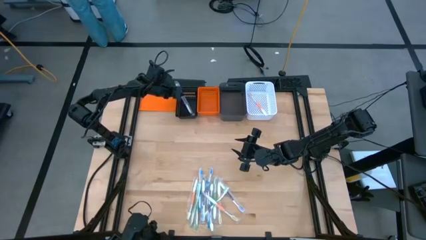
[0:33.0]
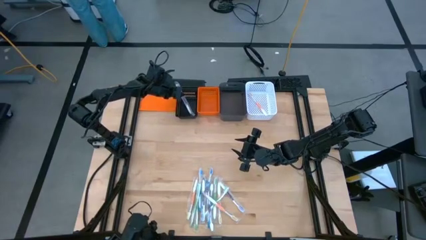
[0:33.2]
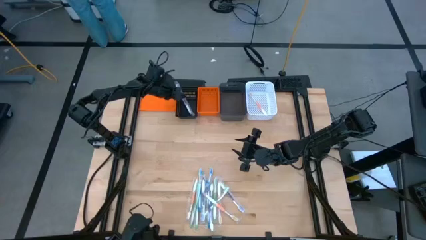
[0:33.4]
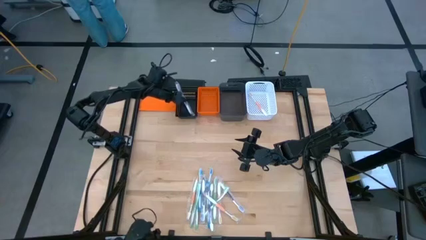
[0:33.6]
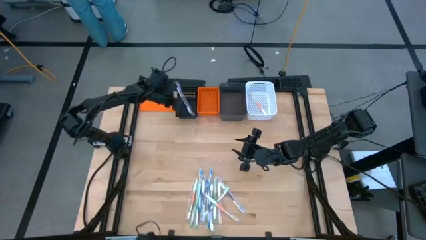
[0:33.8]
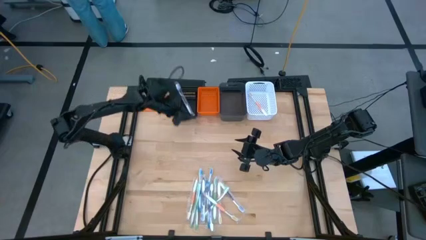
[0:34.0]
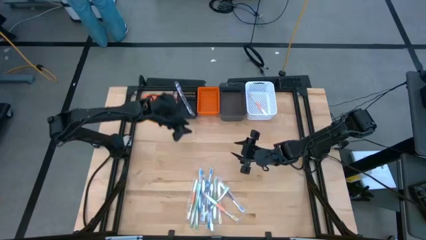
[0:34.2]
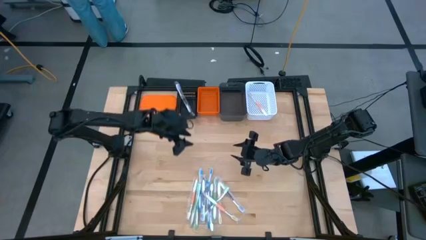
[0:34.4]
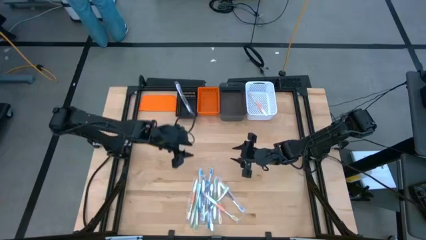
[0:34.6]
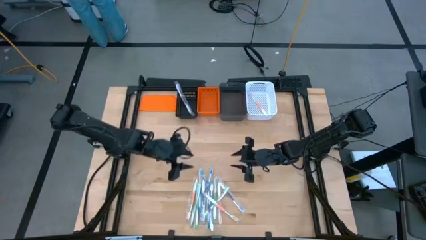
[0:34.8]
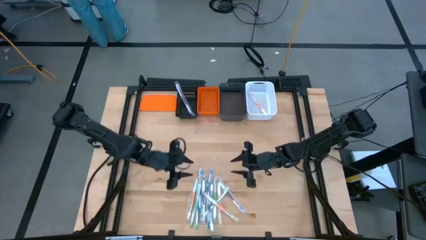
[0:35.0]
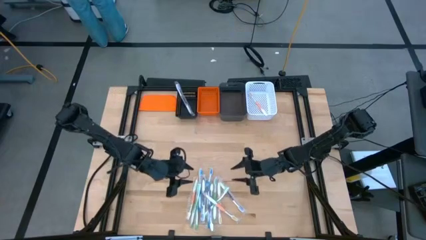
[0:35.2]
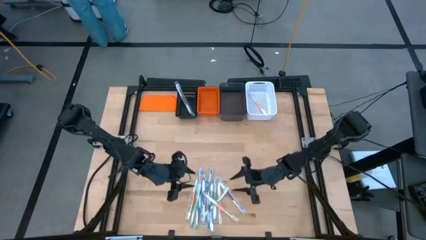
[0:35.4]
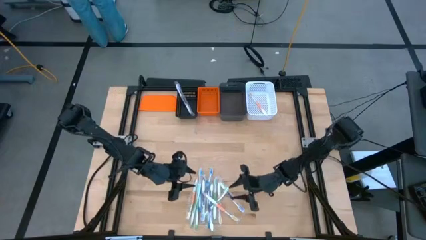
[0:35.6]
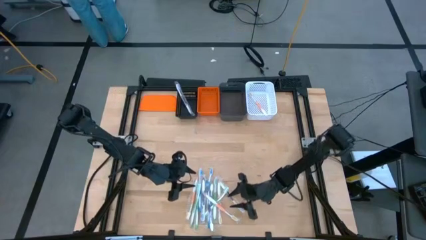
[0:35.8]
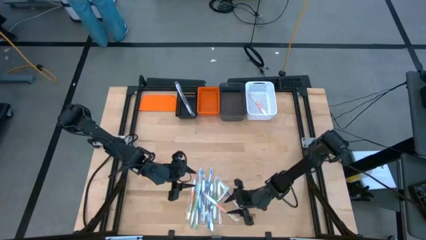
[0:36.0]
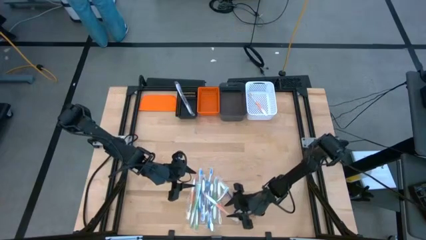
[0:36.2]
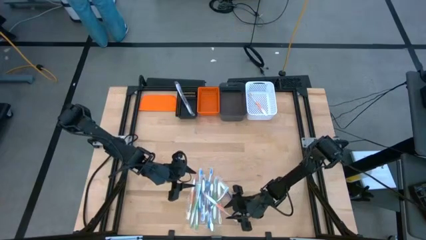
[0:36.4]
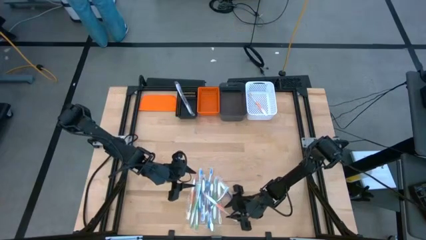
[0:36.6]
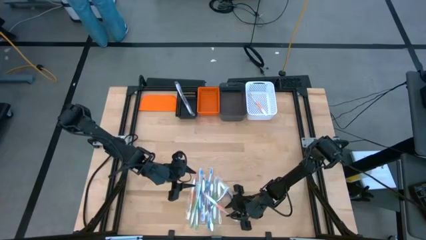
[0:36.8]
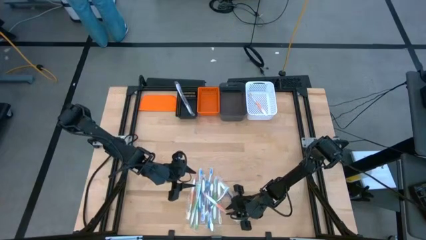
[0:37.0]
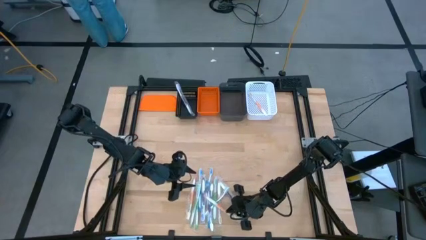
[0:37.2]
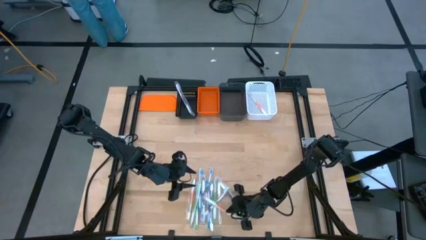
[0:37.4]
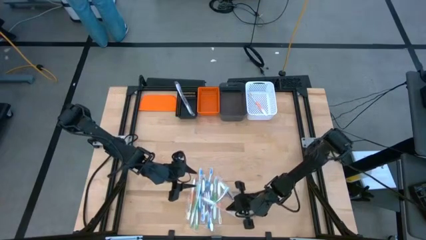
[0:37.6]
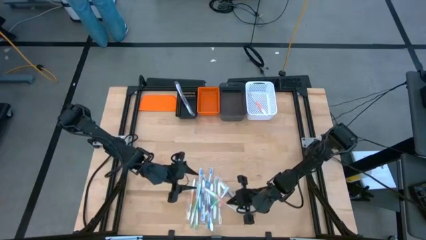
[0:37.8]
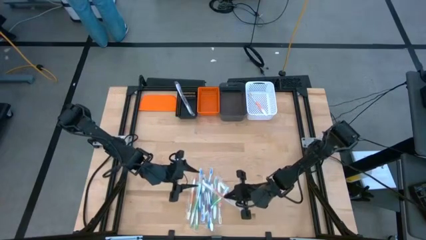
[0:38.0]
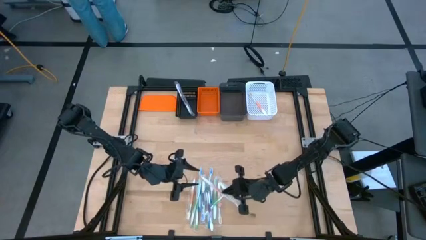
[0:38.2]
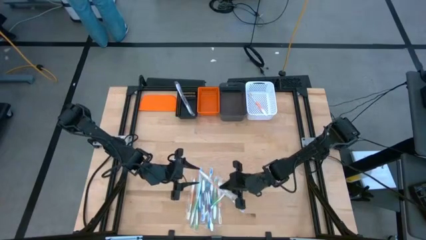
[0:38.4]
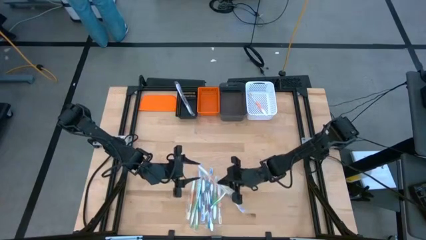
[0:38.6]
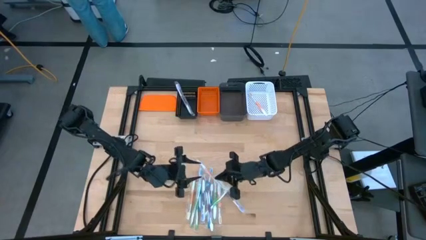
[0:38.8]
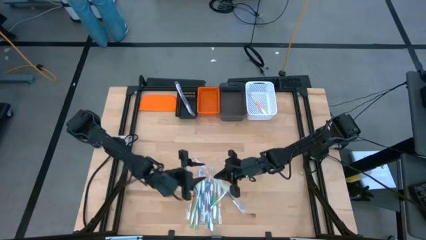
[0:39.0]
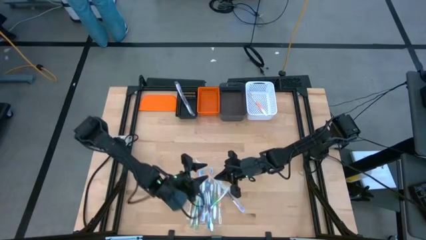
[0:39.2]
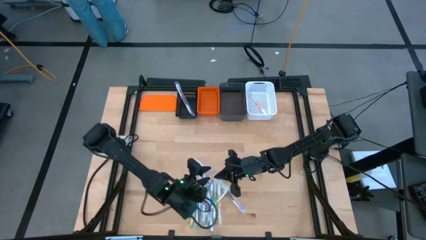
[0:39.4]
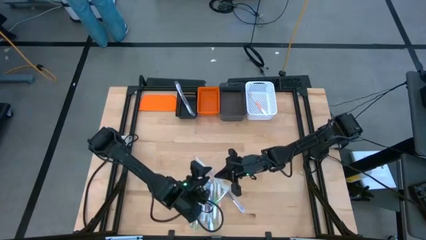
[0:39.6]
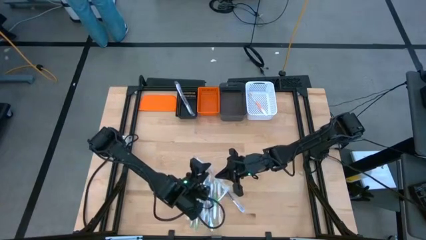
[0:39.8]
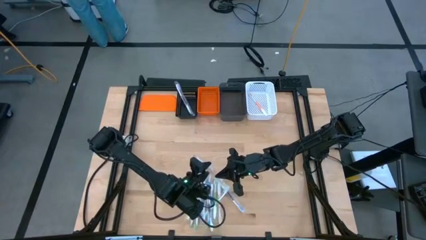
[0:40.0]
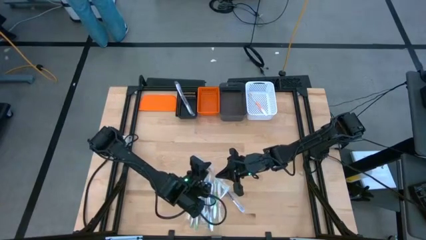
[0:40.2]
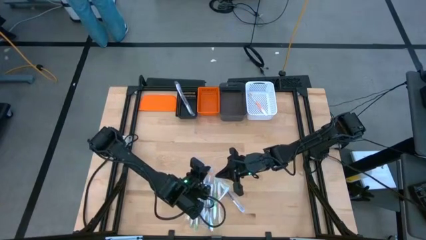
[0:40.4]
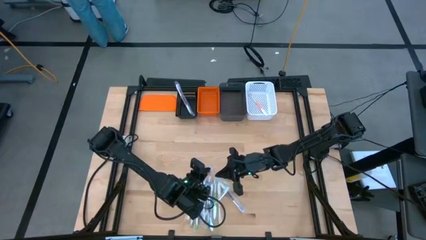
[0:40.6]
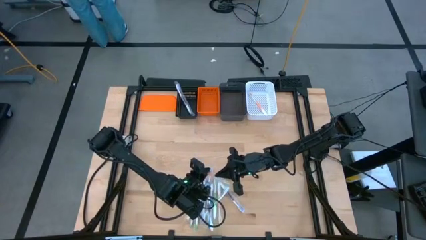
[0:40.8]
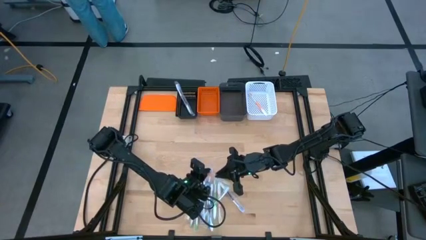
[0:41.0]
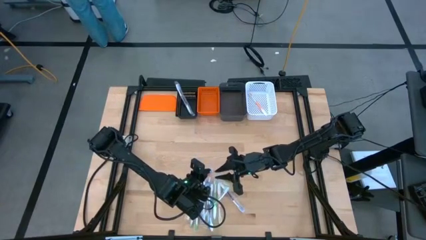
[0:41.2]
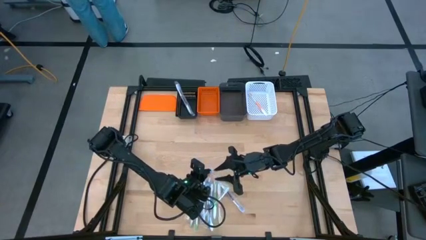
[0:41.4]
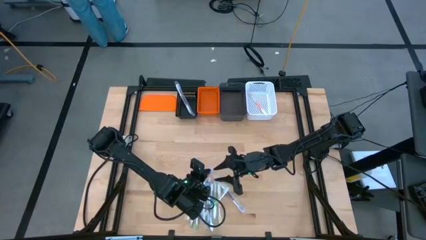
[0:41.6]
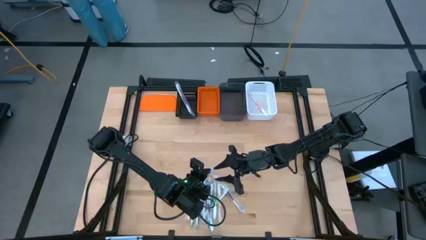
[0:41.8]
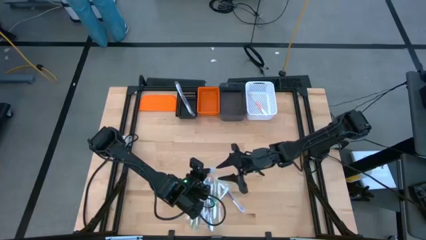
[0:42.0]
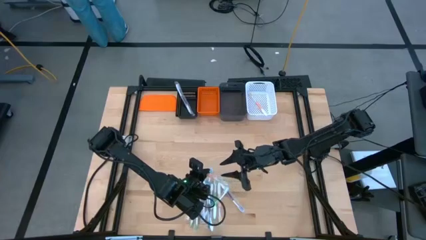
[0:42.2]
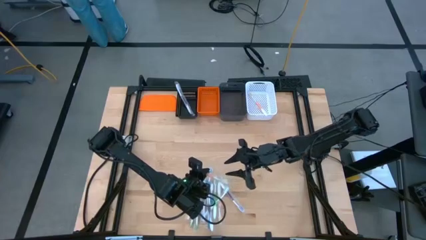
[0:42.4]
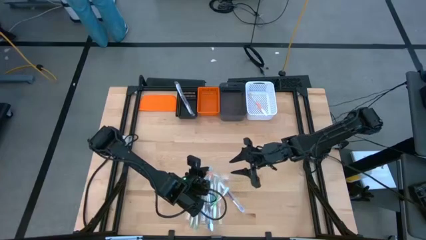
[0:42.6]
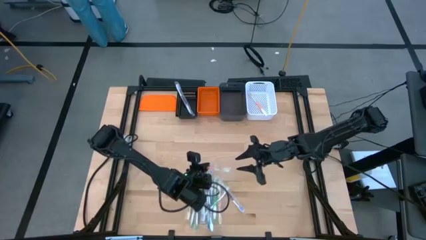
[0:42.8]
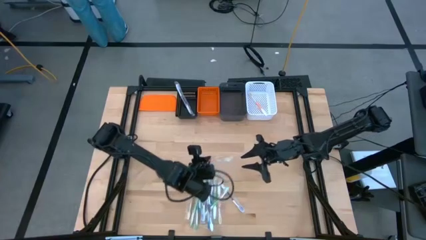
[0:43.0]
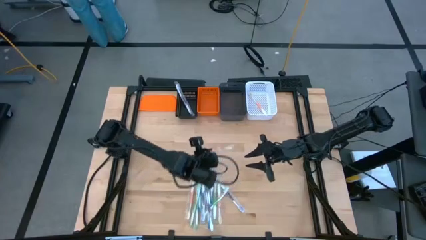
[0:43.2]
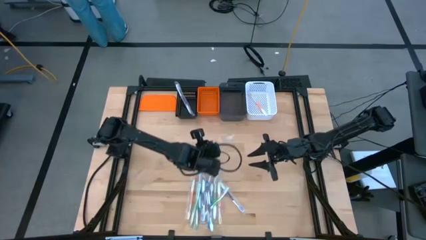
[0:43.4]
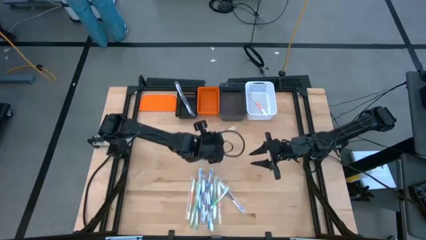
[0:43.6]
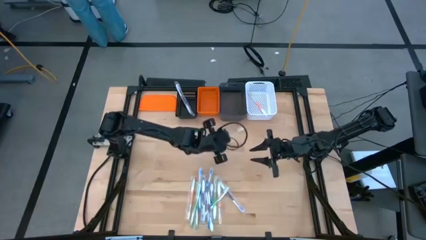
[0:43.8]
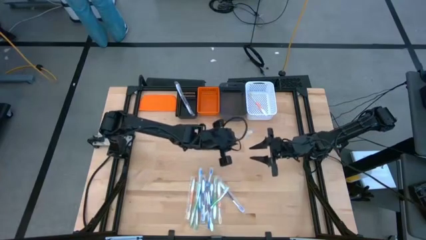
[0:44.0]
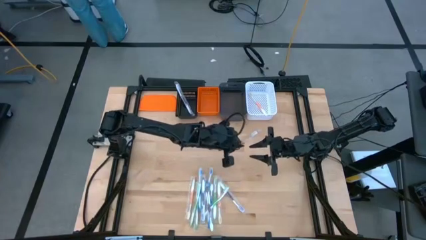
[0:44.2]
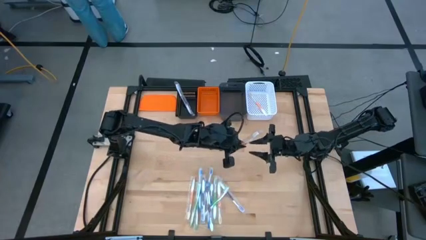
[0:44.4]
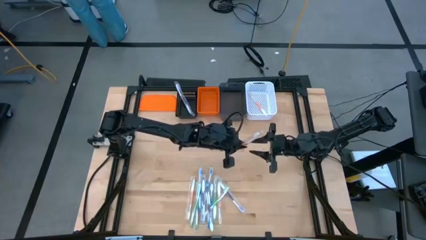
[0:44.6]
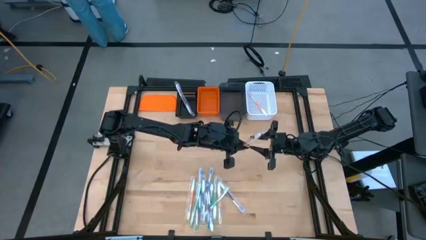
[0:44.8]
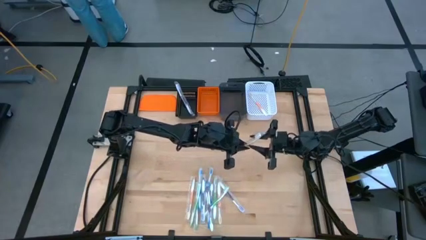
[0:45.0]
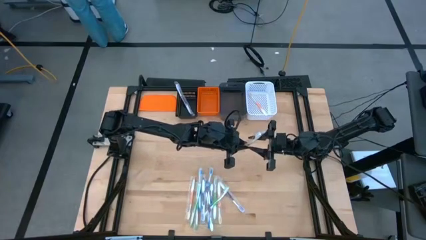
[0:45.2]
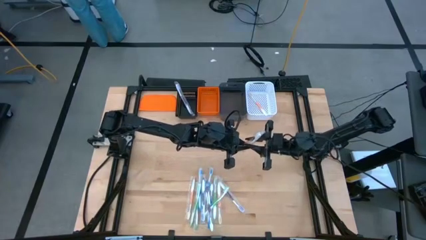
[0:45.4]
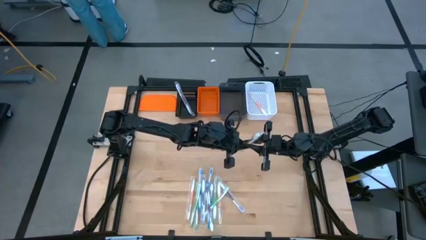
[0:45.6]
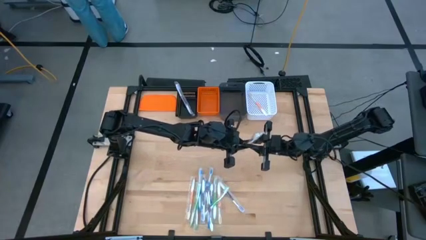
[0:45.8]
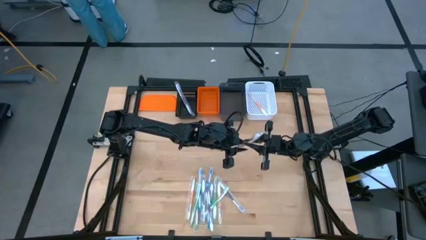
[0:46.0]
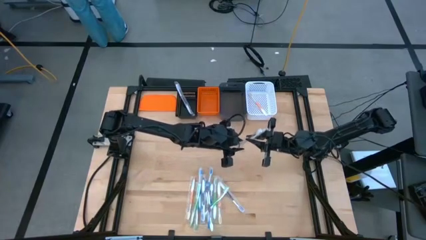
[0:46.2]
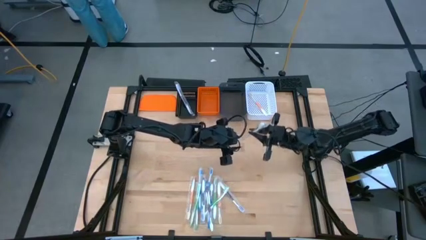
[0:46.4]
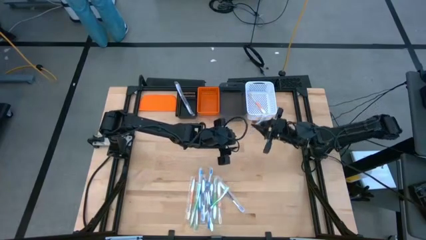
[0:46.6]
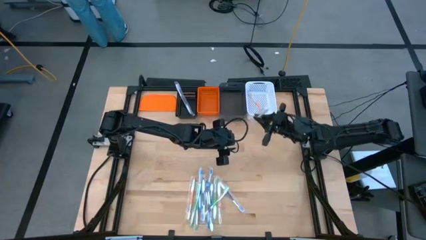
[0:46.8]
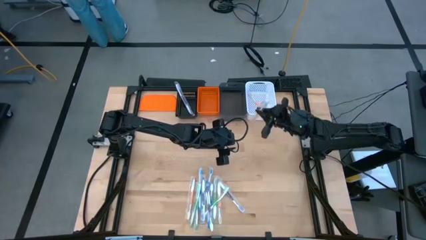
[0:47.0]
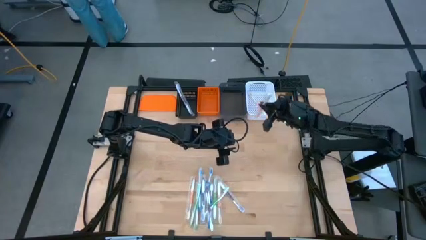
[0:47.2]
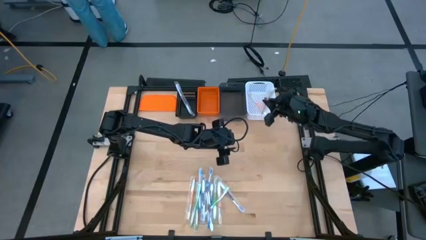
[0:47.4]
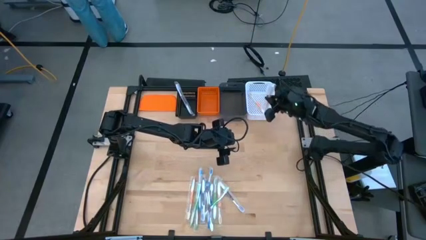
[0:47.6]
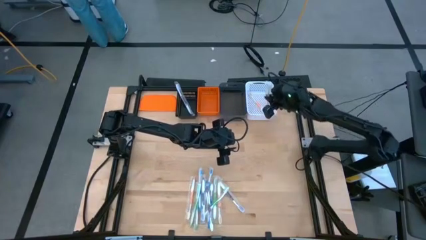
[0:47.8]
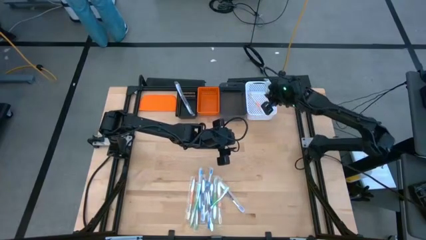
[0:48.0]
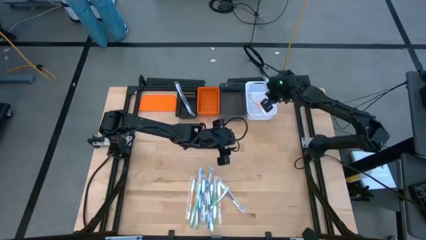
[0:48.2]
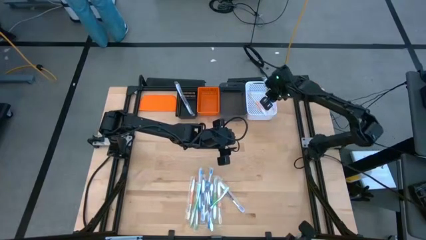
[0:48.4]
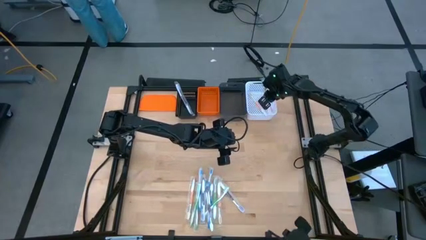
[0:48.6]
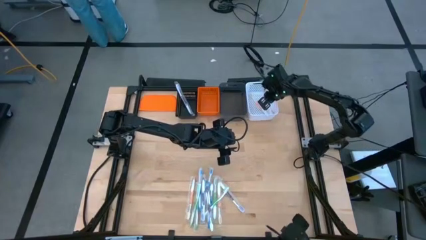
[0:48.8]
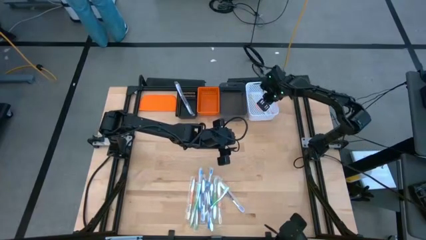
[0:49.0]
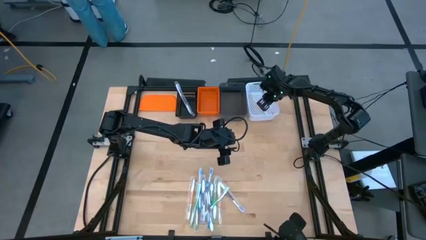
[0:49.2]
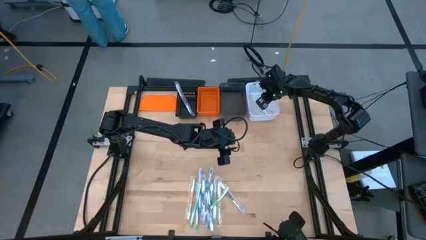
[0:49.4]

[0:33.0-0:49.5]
Task: Pick & Place Toothbrushes
Put the orange toothbrush into the white bin

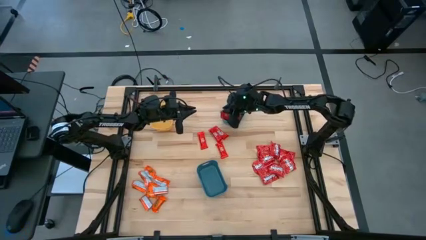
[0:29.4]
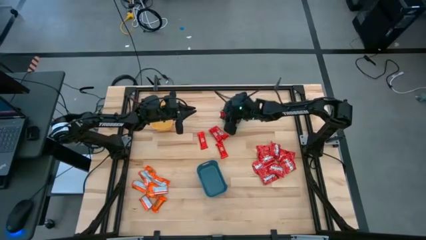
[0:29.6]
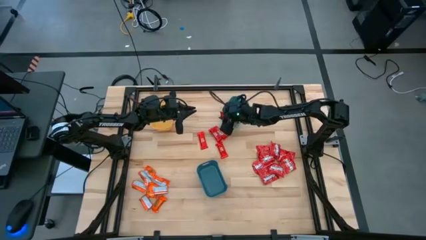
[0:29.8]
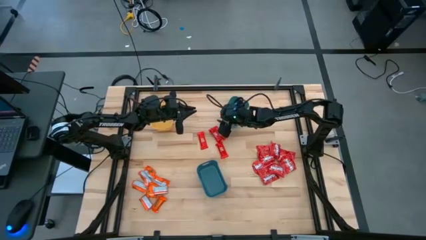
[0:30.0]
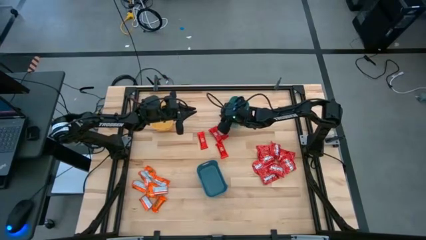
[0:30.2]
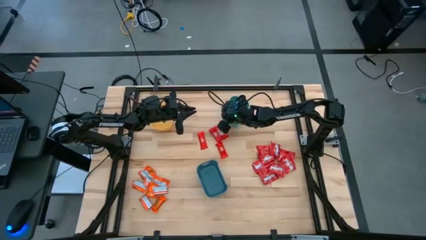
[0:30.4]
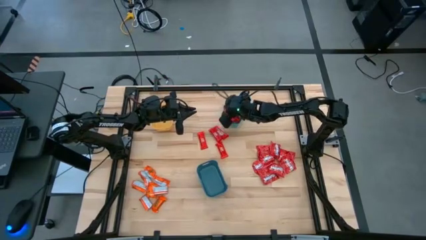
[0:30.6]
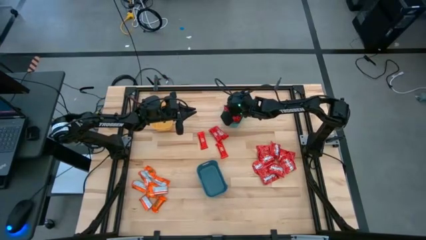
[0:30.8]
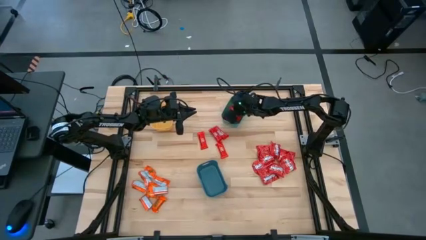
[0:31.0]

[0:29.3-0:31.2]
Task: Sort candy
Put the red chocolate bar into the green bin
